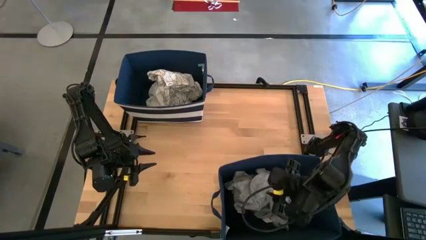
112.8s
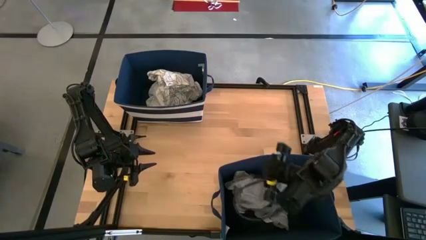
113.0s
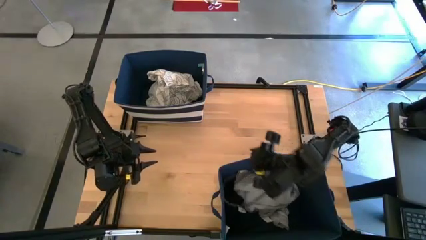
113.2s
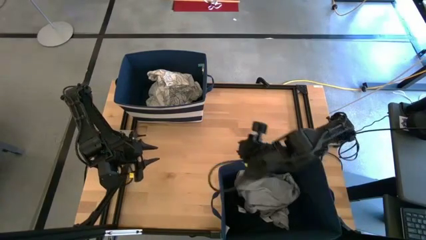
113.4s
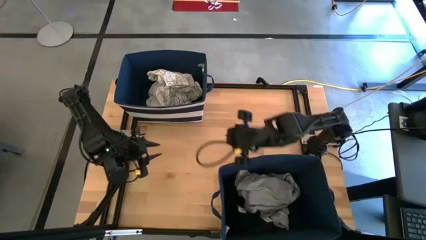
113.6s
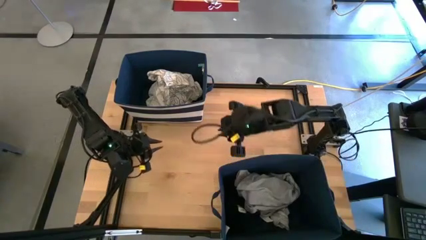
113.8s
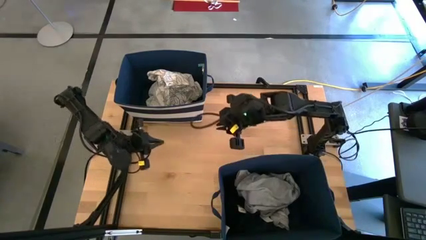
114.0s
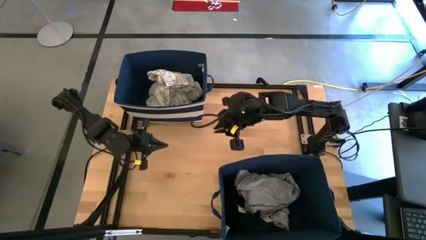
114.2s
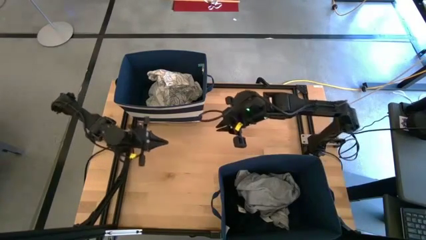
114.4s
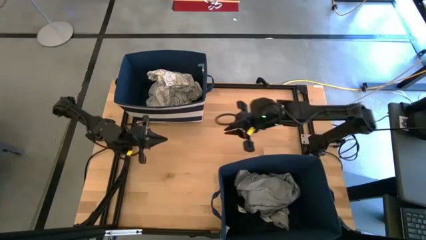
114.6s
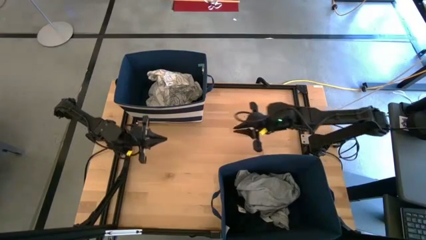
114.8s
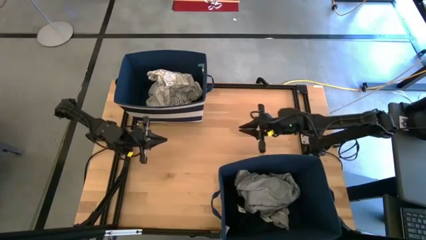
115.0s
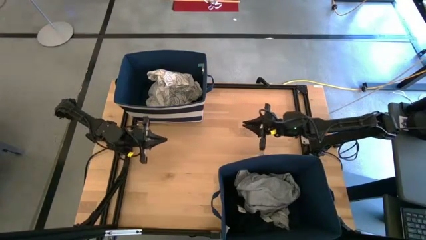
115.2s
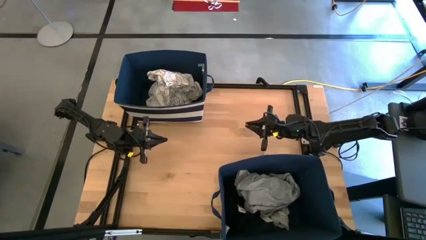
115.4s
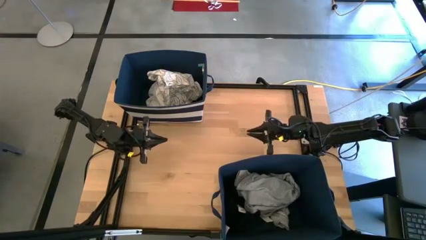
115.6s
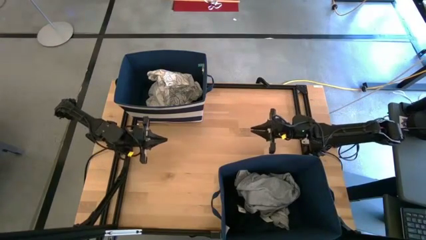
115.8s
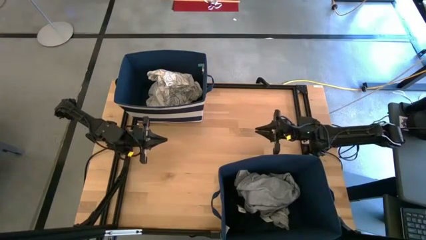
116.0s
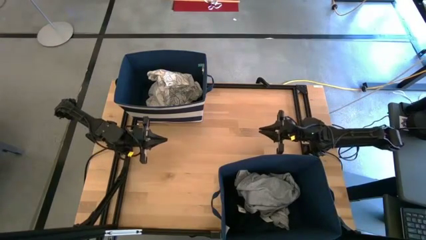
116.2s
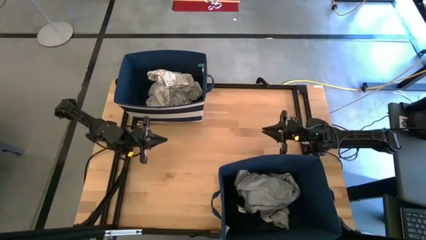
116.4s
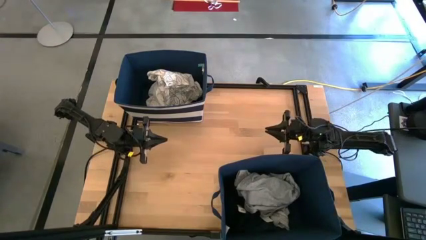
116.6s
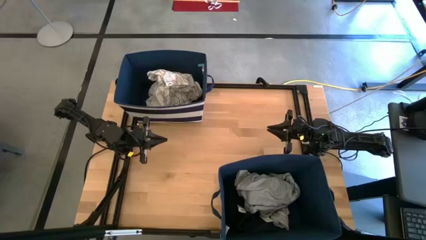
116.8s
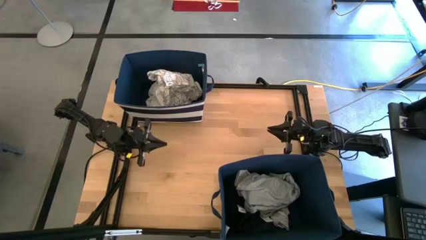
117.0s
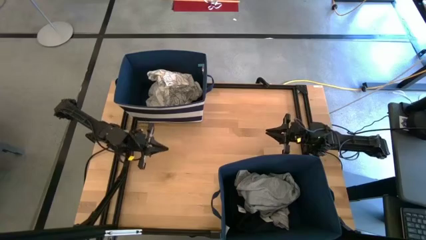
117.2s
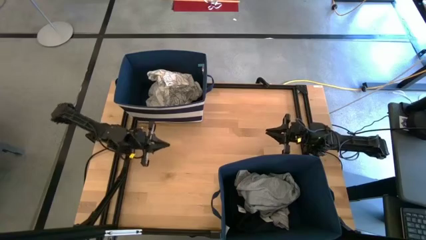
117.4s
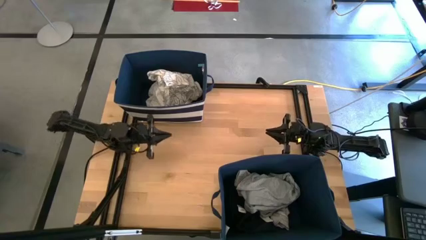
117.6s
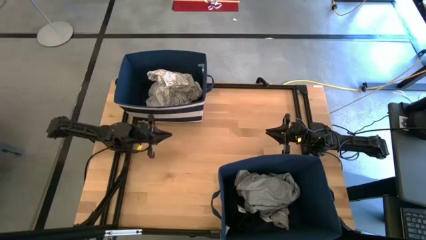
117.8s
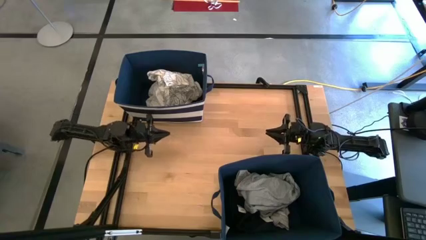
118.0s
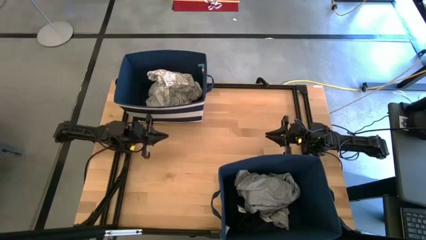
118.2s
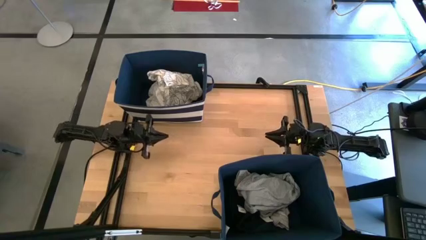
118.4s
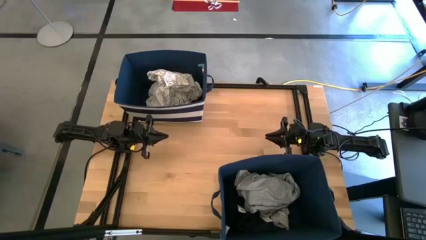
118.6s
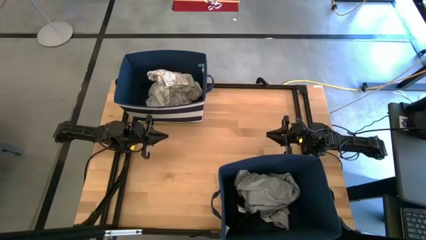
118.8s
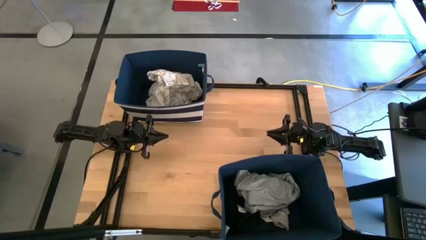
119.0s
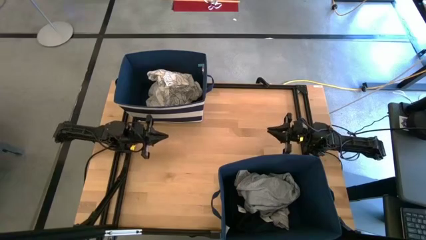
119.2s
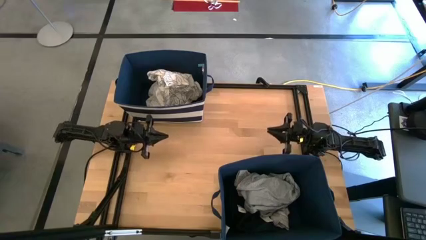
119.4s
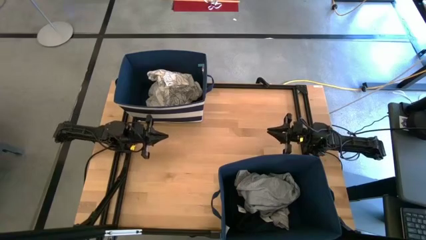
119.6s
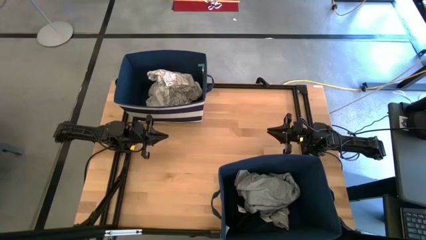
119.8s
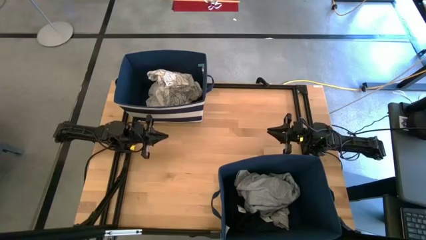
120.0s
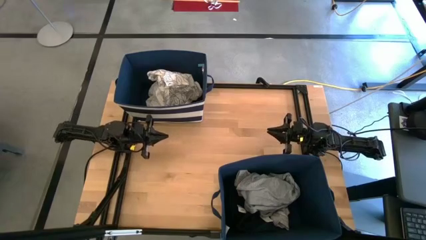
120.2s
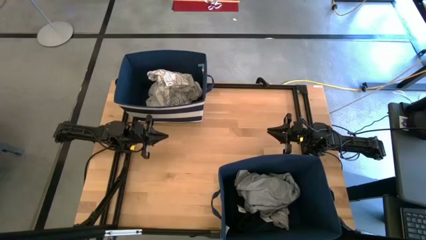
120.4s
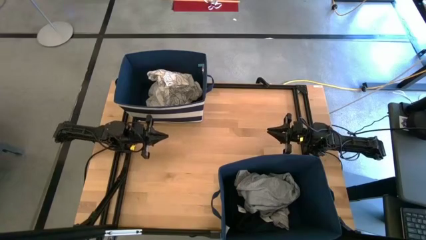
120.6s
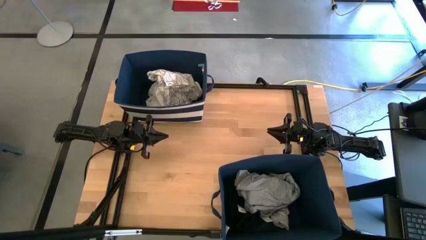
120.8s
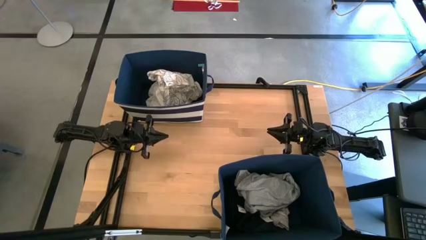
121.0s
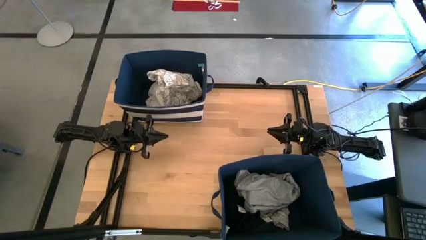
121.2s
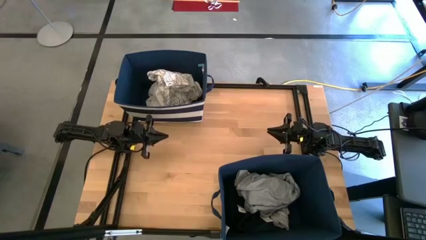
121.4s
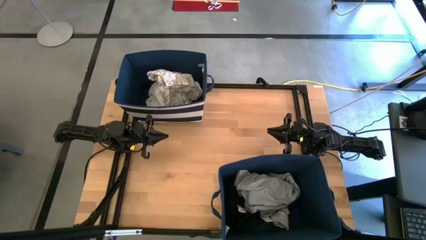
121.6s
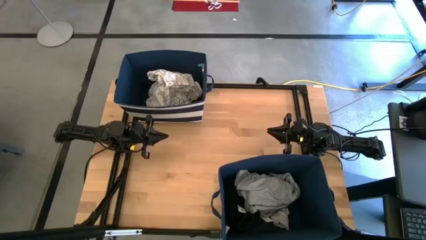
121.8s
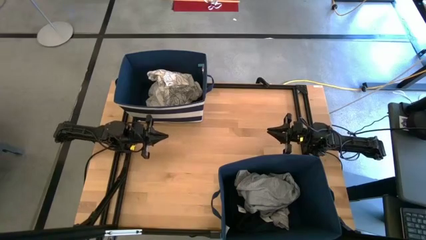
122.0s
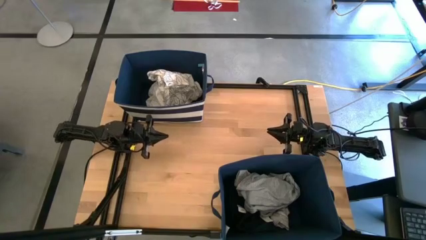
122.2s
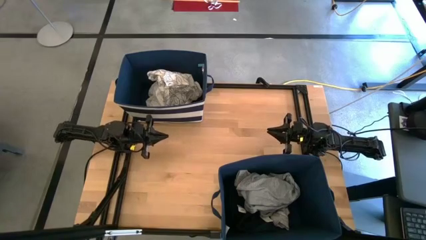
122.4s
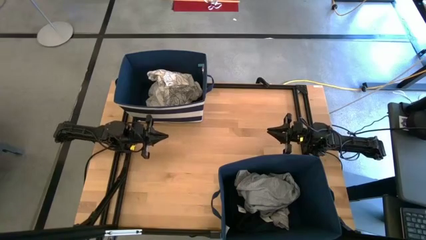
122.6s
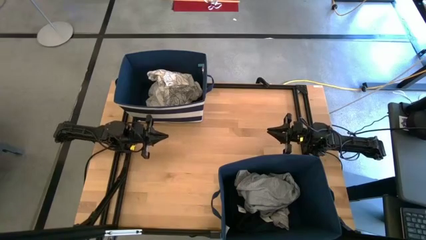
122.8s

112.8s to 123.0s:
Task: Sort clothes
Return to Home Position

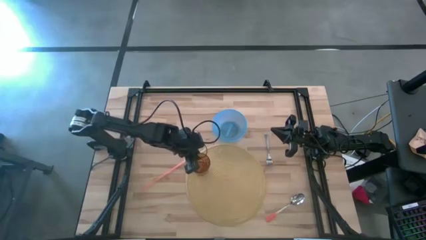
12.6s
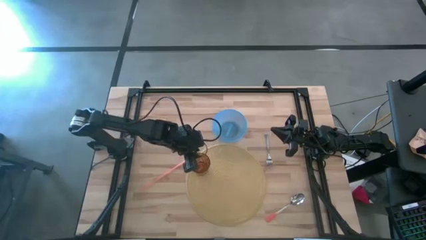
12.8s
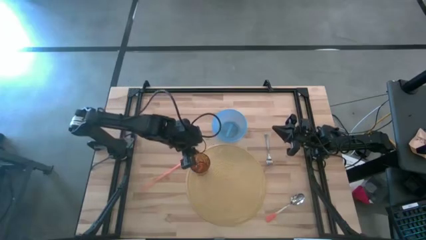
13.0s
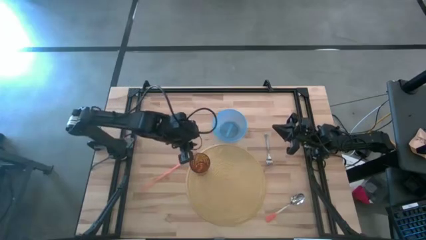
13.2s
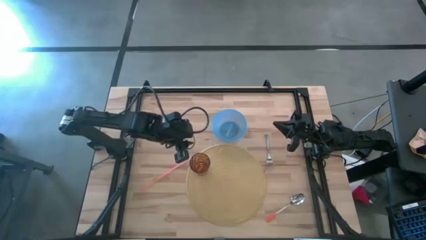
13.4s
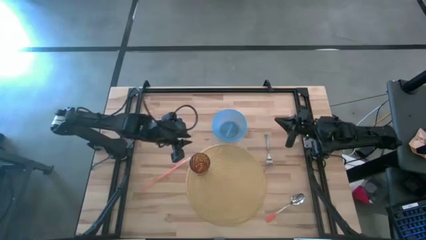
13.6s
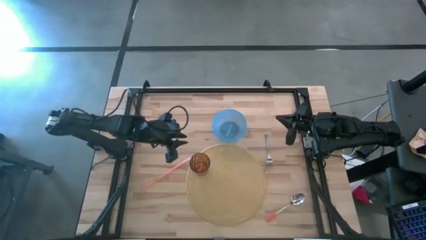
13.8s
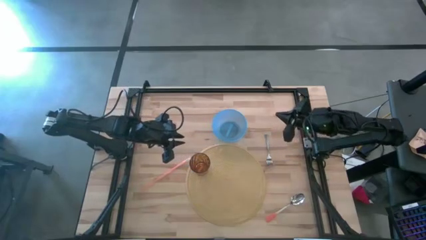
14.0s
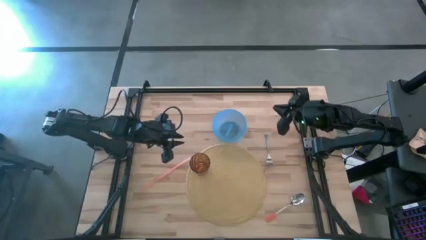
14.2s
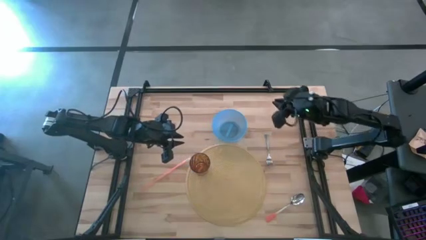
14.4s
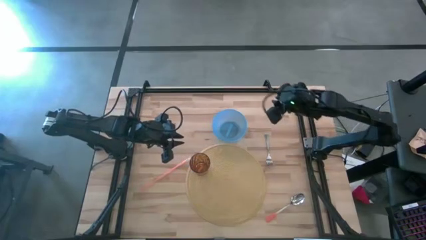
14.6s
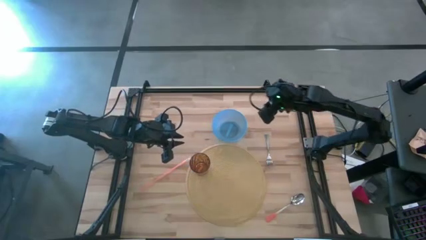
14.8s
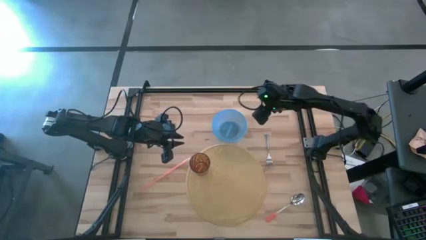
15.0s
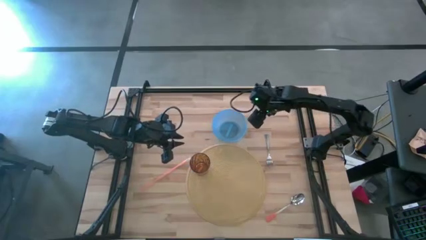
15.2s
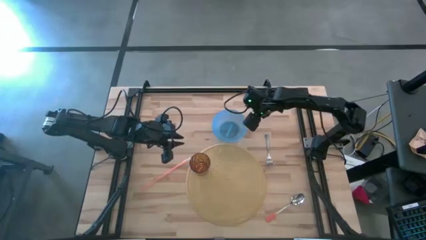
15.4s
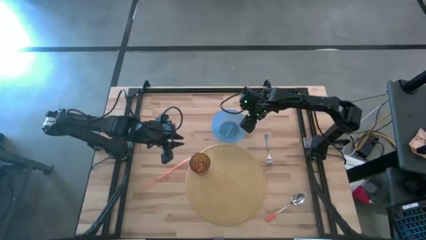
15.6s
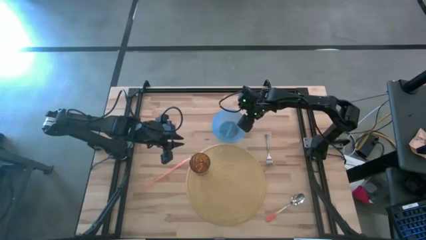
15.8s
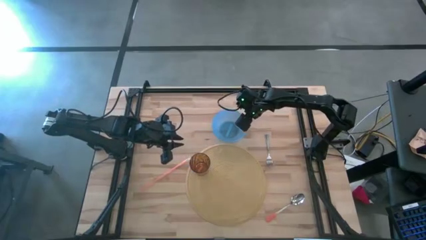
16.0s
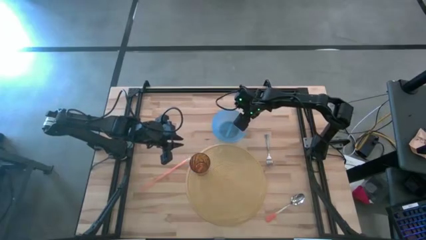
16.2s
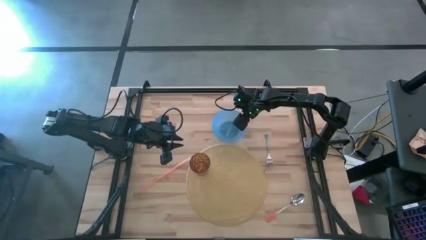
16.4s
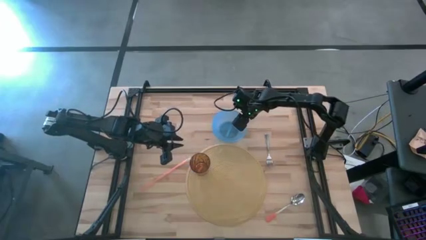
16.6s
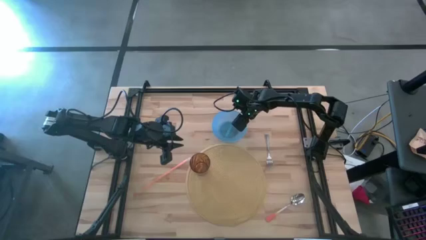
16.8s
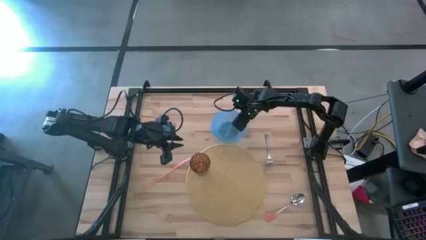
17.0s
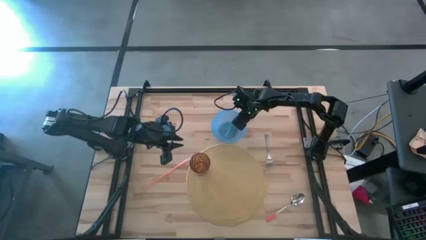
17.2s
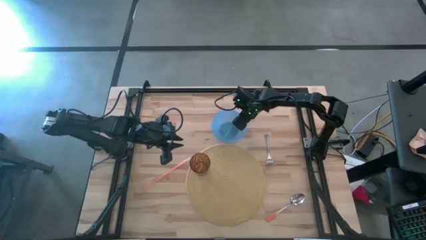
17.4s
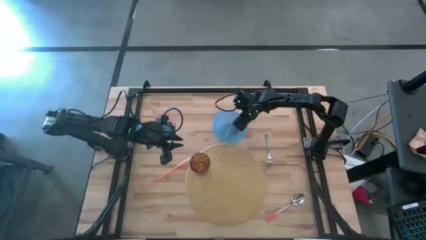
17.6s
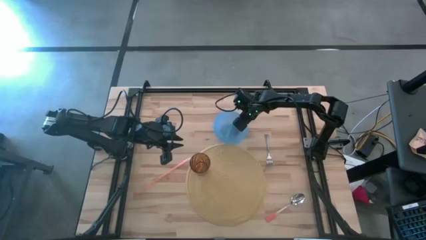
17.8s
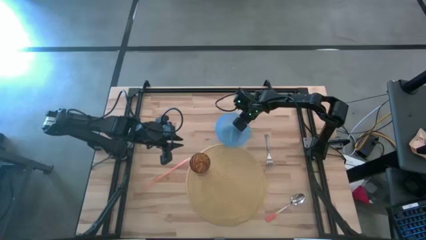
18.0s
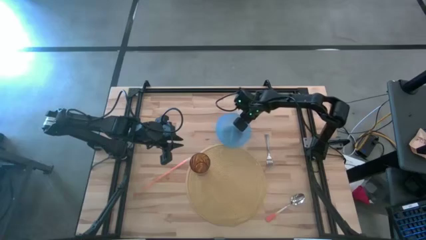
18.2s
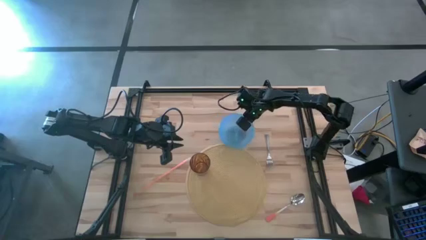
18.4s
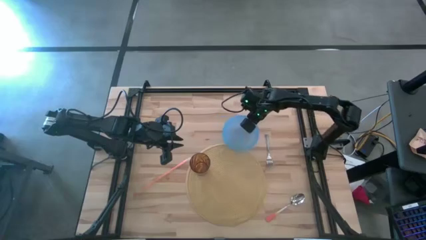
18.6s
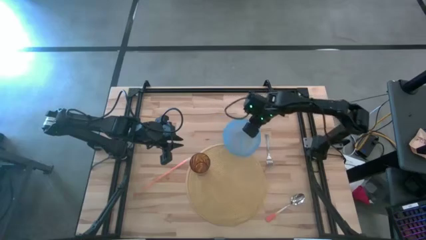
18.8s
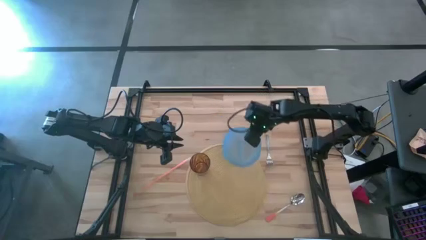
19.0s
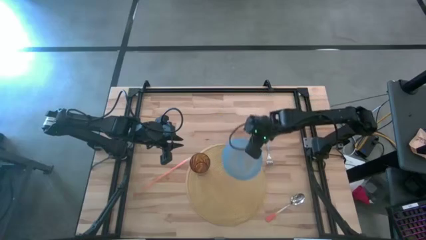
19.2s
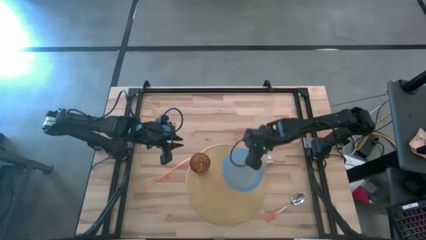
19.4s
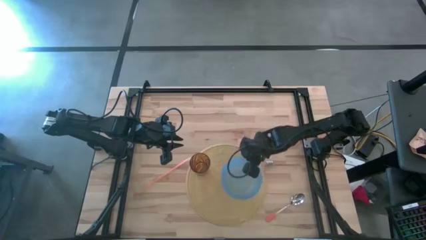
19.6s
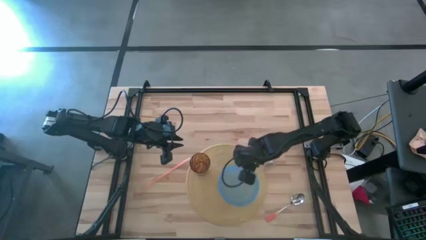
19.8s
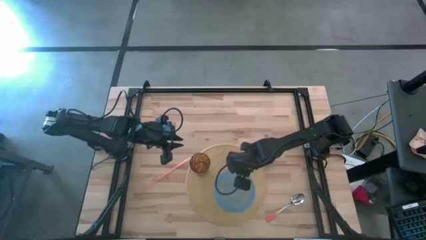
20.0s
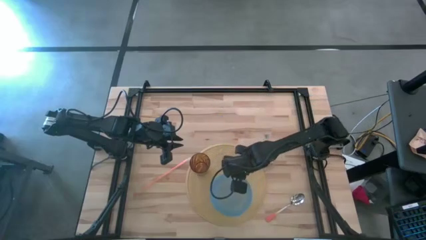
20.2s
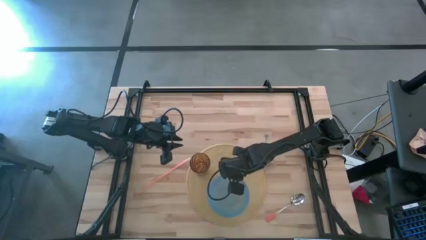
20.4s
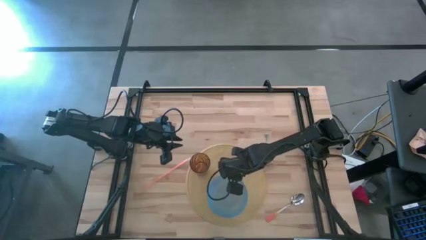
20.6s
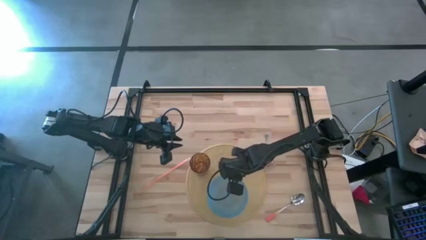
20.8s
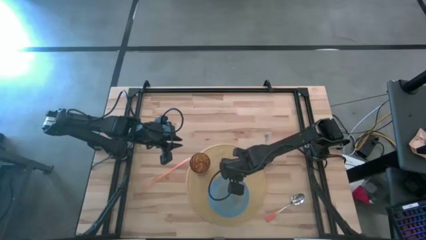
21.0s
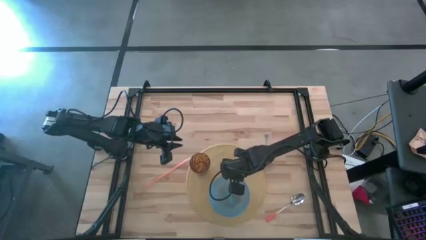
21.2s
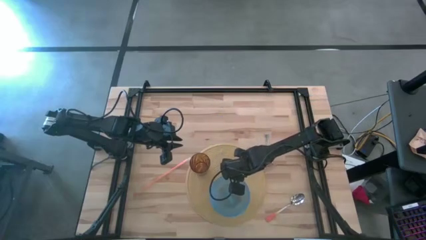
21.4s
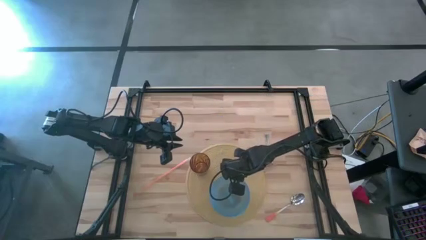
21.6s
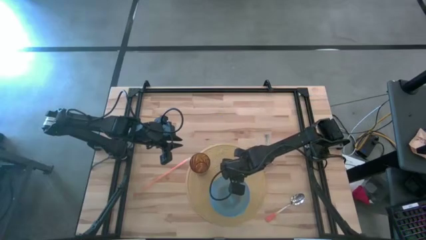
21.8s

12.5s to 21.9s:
Task: Pick & Place Utensil
Put the blue bowl to the bottom of the brown cup on the brown mat
